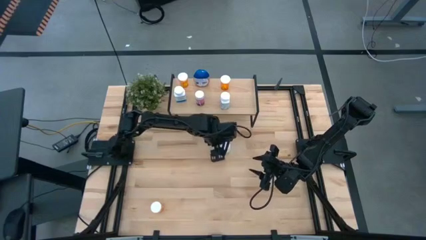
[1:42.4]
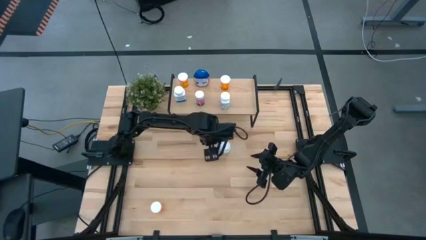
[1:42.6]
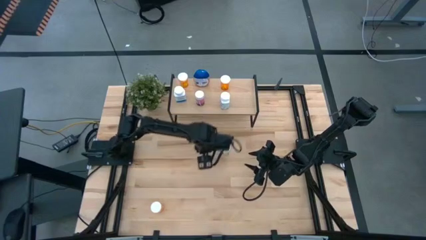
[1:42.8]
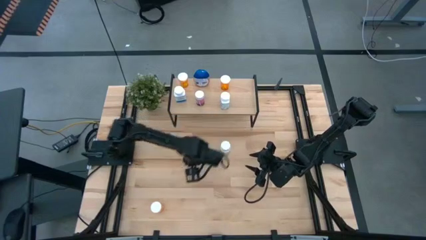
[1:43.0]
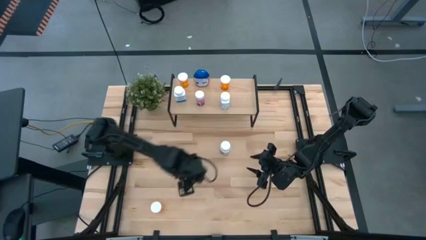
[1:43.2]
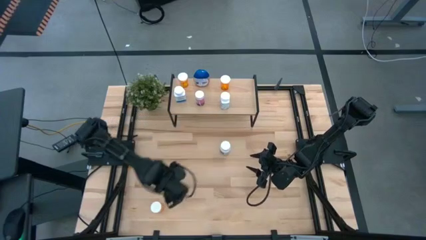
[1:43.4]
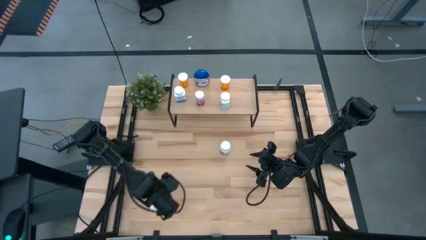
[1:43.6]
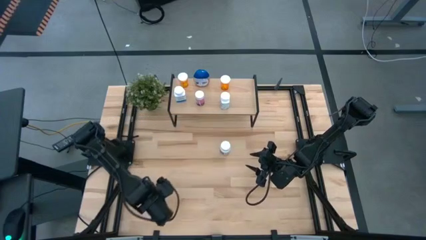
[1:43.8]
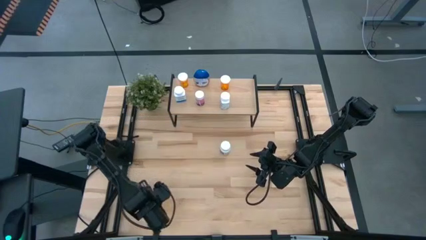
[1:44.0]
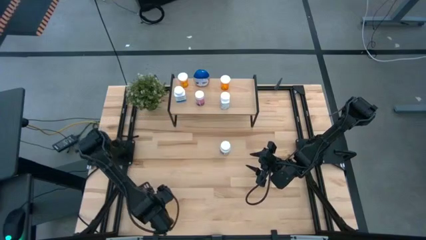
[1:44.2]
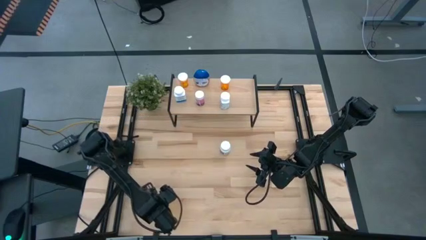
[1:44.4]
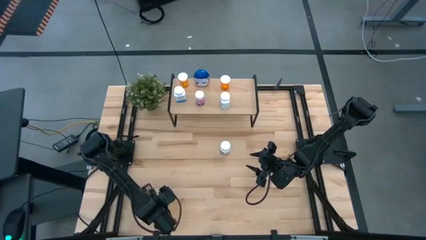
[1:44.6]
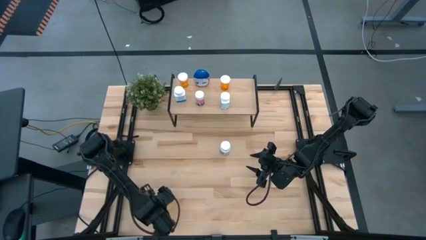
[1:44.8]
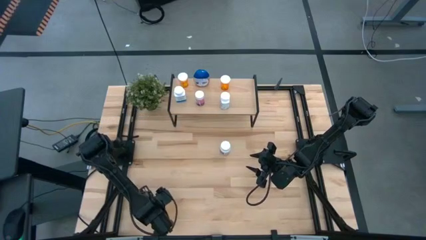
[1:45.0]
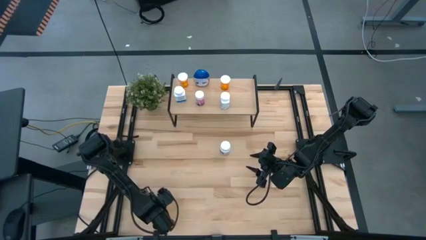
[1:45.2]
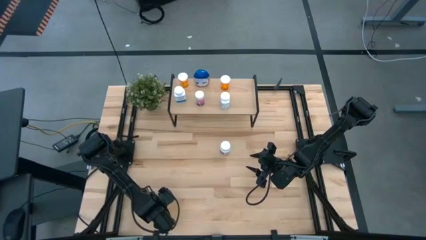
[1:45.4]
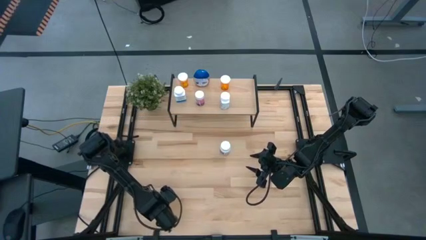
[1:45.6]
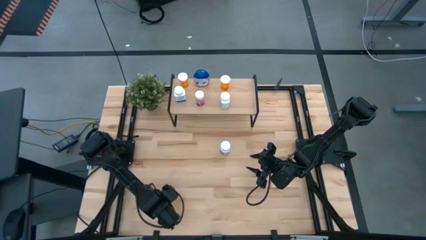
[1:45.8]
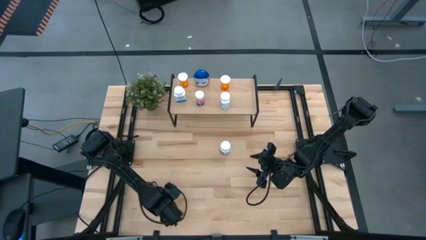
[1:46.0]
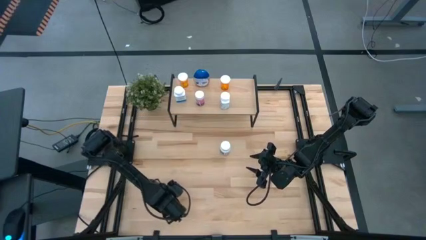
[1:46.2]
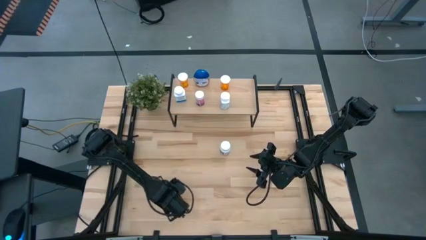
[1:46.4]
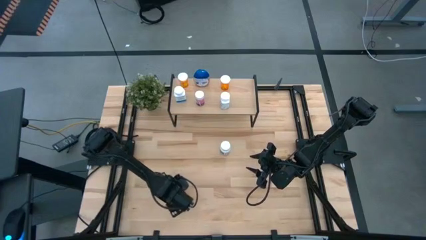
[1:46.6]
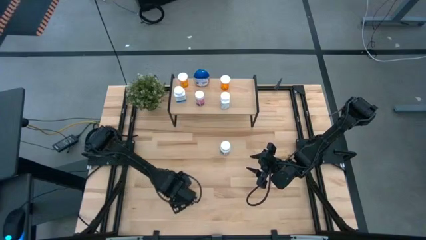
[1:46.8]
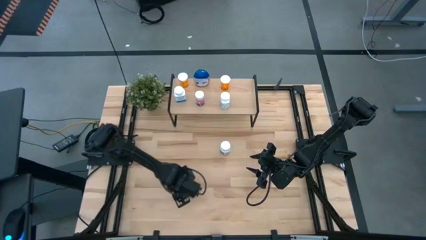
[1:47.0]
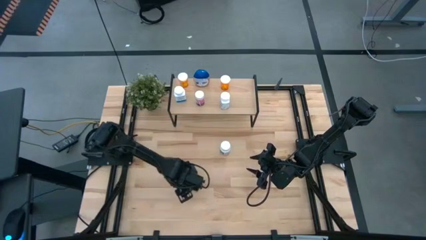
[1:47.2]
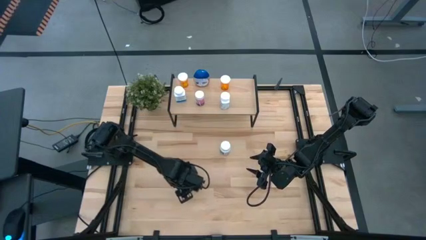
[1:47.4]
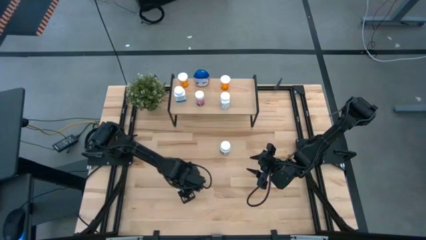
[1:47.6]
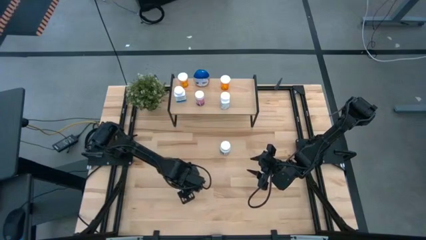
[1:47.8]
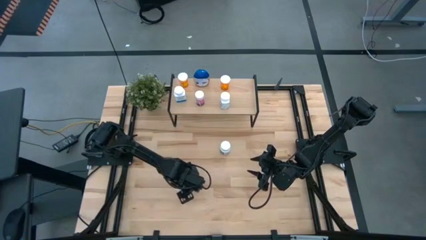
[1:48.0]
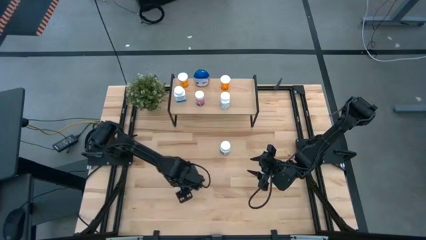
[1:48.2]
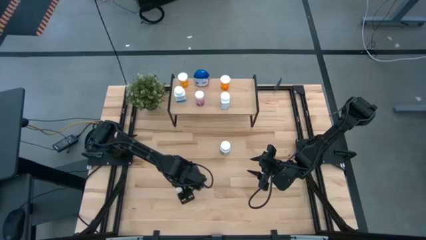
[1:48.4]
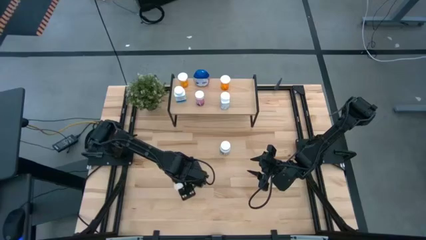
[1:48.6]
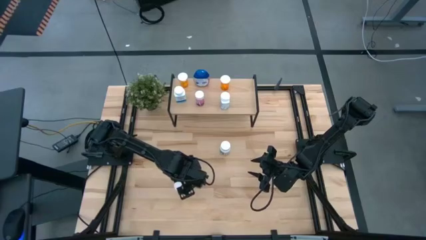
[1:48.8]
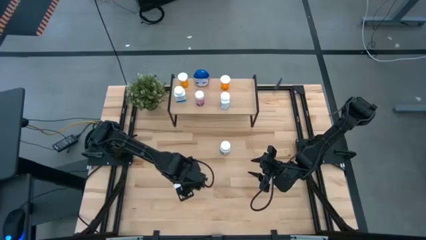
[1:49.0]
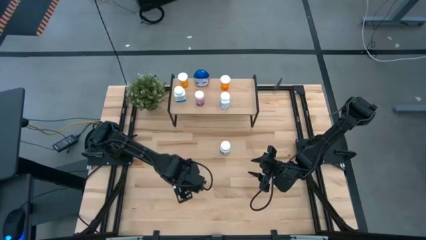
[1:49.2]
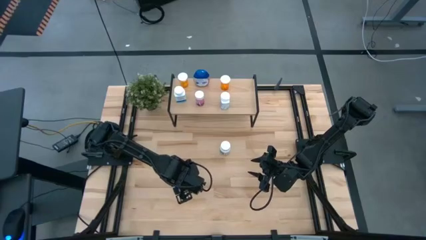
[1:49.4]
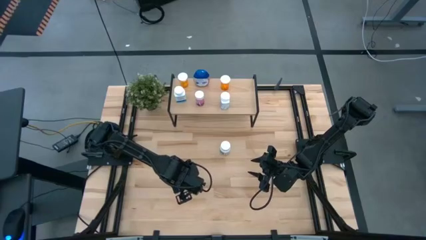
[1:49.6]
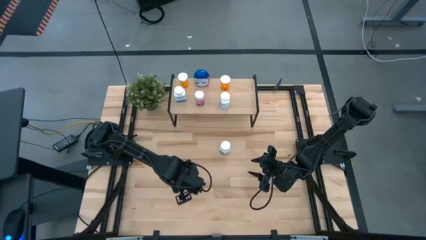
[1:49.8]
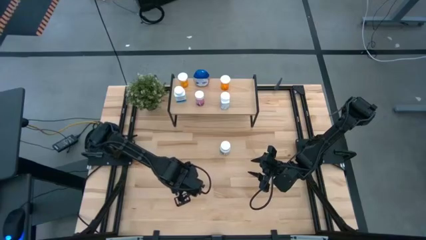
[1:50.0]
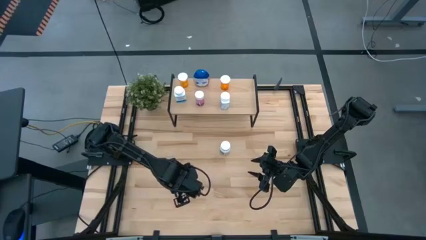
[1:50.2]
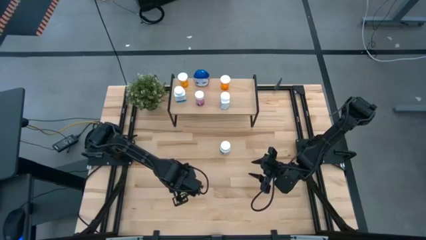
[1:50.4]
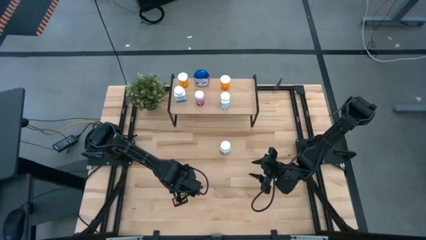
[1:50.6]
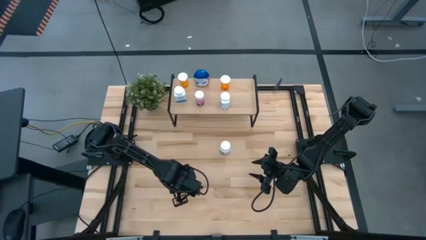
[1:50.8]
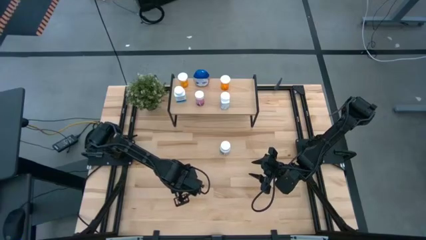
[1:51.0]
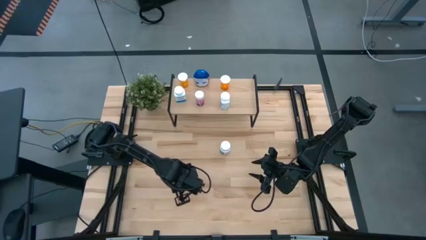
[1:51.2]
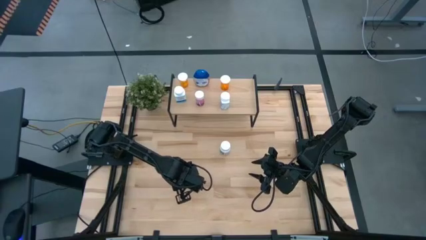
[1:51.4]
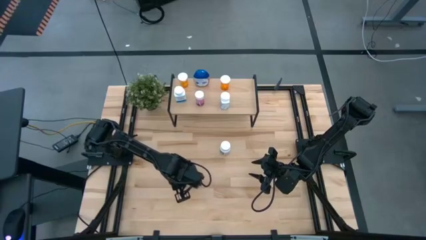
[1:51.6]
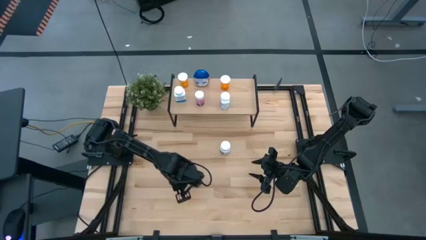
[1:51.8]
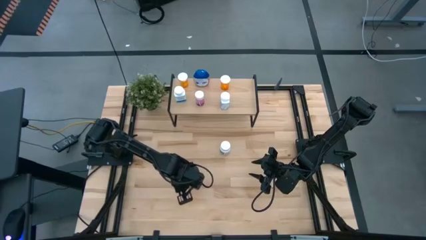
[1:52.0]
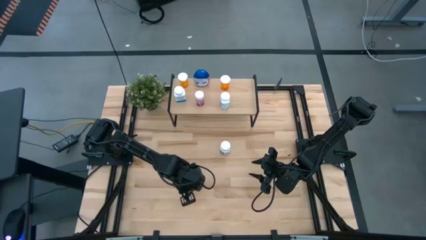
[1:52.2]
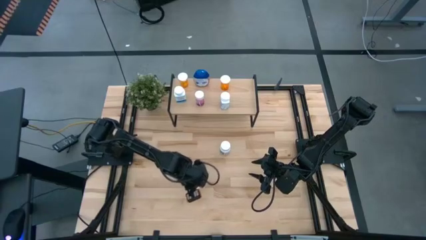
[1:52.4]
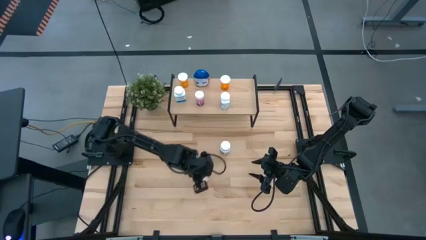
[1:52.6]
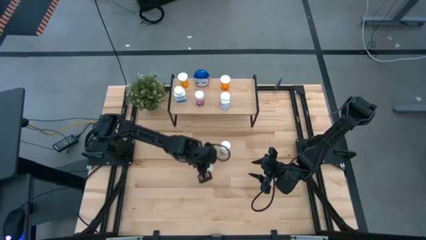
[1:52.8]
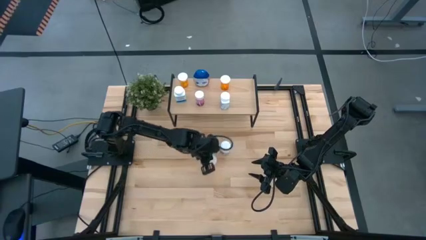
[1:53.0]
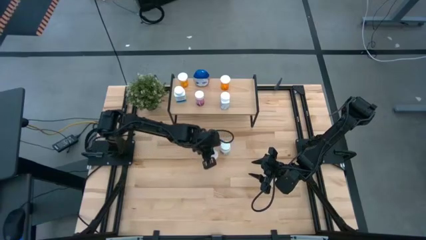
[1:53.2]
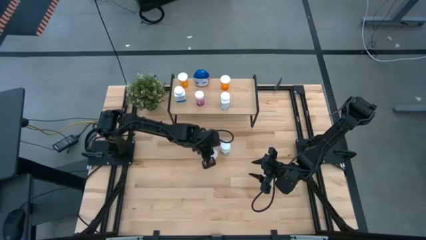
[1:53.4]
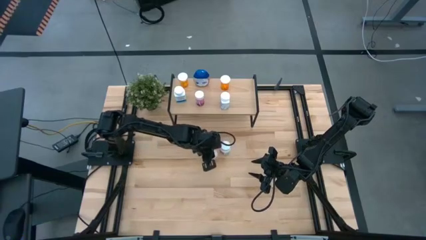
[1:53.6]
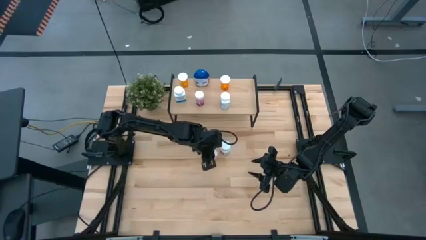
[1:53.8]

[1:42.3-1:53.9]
Task: Pick and place medicine bottles onto shelf by color
Move the orange pill bottle to the center of the table

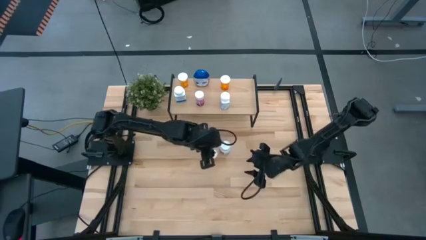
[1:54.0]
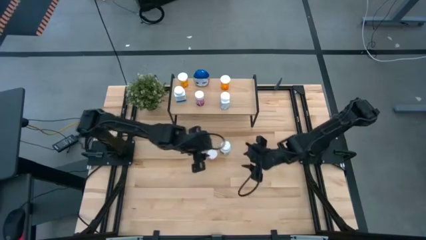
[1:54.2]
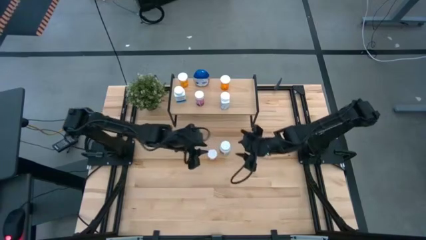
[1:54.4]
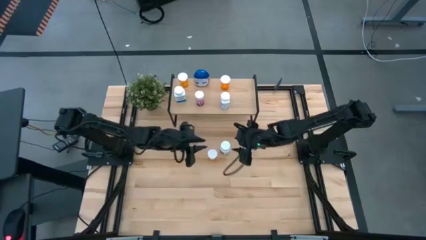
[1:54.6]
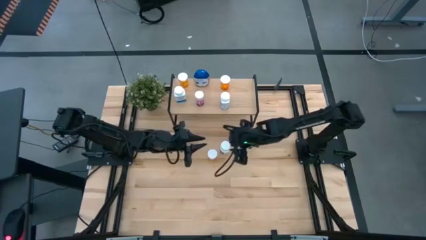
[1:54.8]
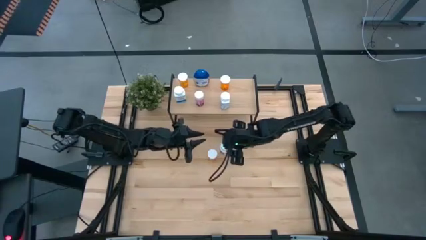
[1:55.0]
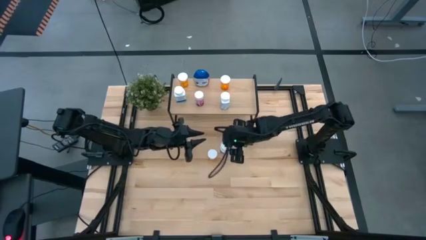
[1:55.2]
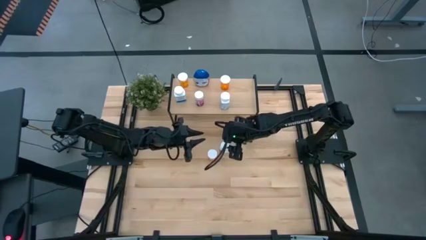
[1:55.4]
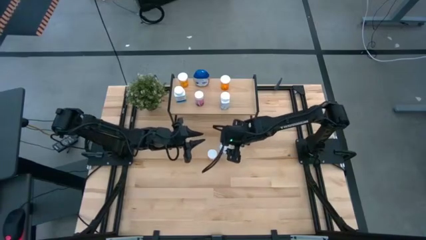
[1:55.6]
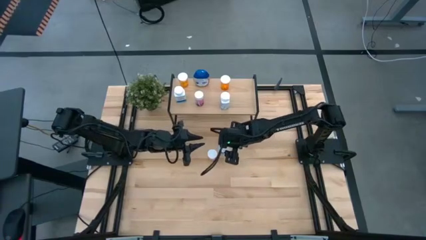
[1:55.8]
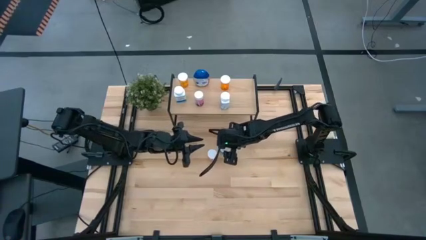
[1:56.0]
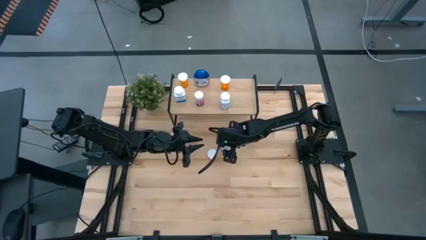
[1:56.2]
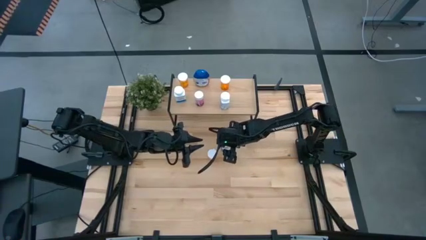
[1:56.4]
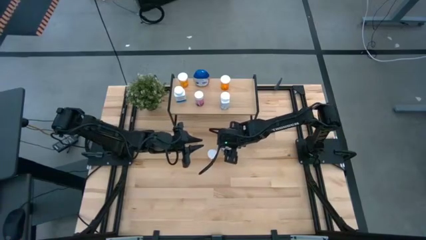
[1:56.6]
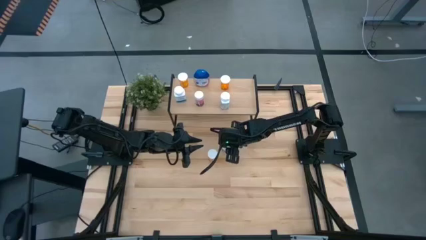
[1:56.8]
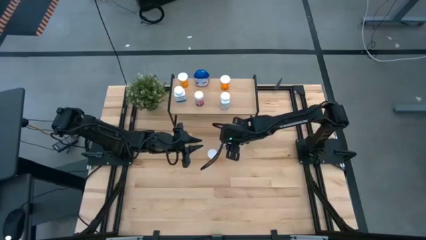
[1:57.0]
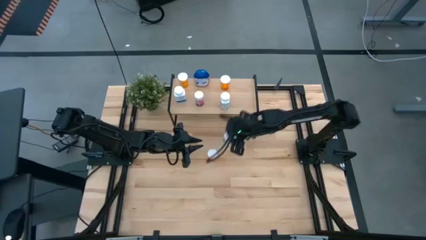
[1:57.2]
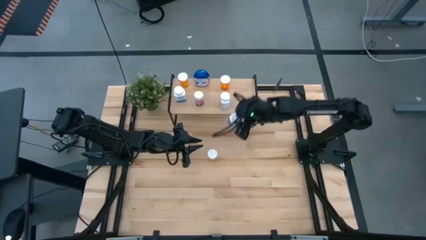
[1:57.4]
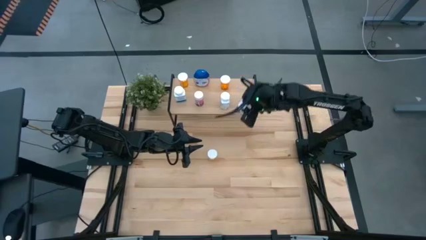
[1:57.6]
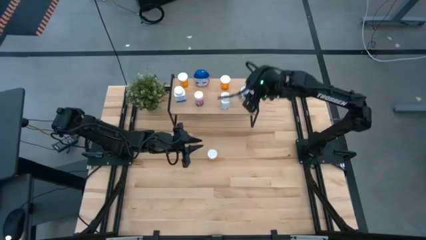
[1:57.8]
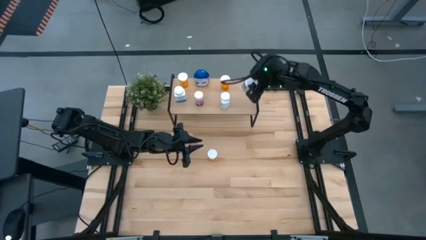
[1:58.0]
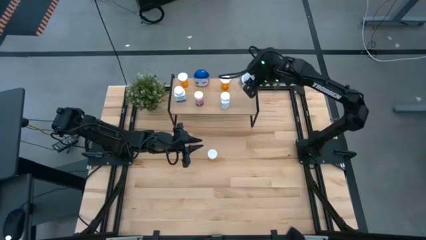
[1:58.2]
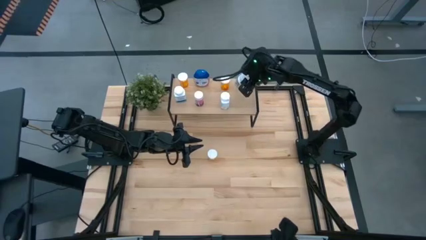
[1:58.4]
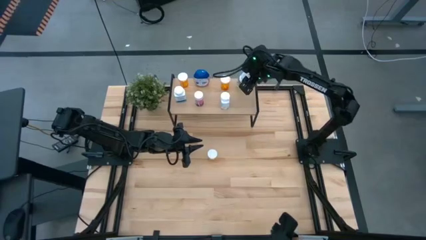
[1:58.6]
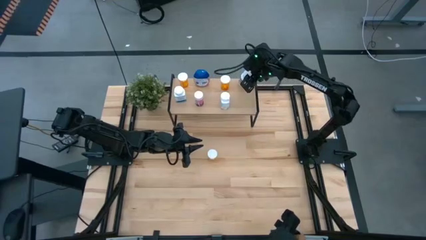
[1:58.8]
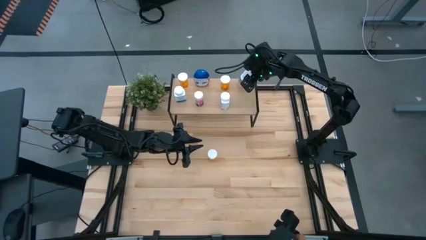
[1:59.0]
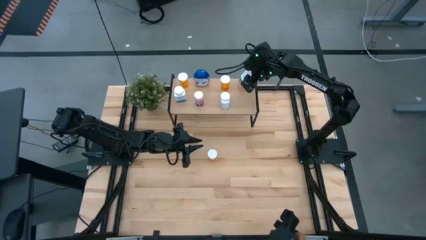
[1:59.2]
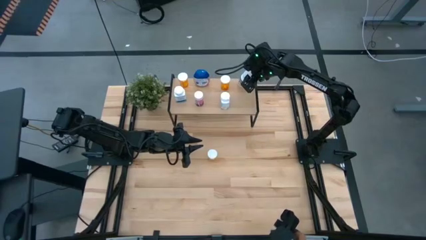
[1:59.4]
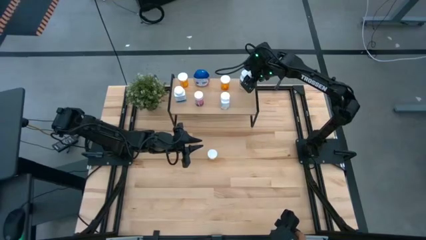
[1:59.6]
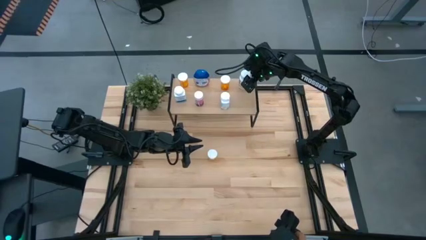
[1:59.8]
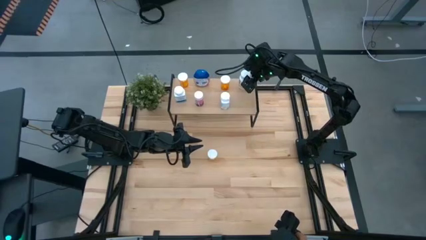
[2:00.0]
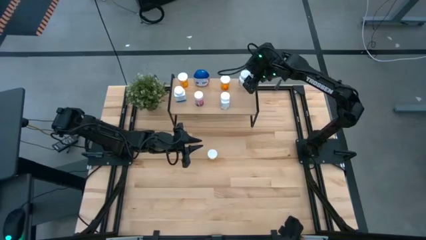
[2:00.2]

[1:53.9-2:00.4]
Put the white pill bottle on the shelf
